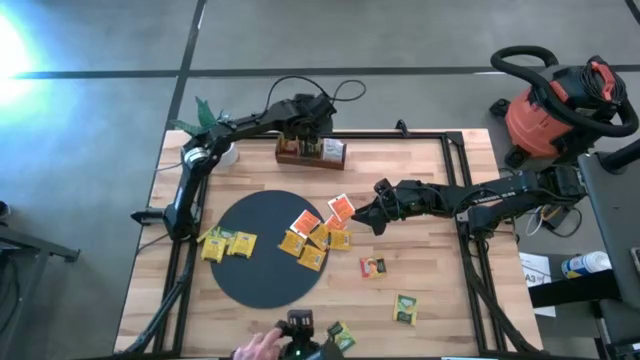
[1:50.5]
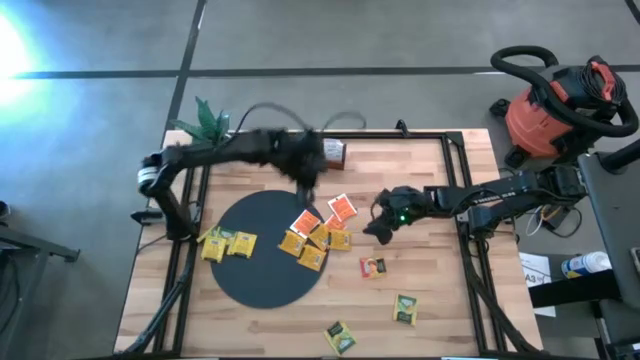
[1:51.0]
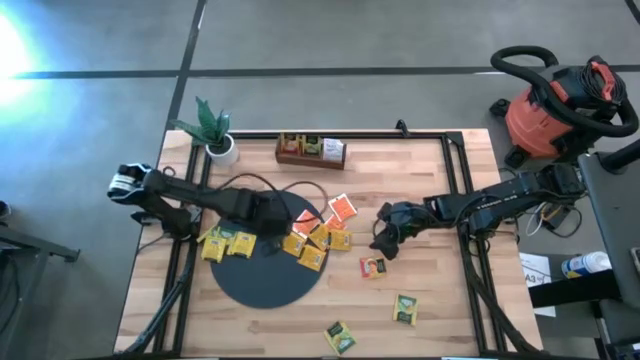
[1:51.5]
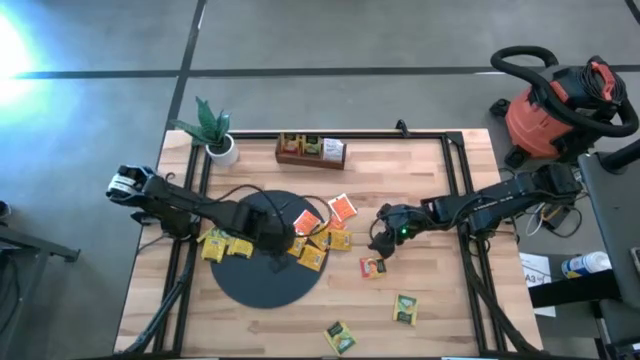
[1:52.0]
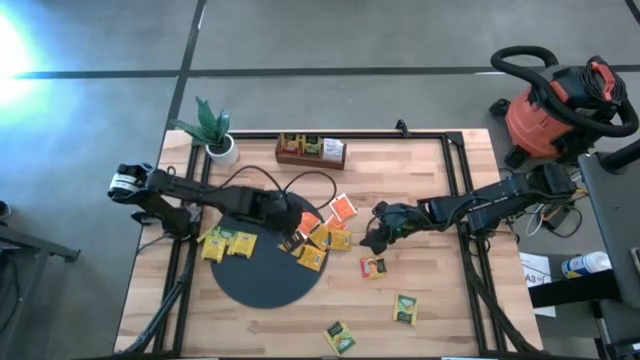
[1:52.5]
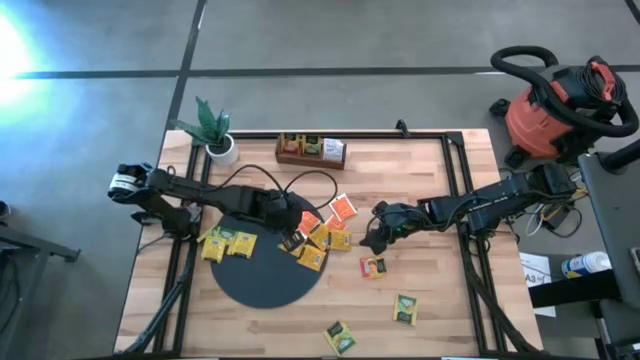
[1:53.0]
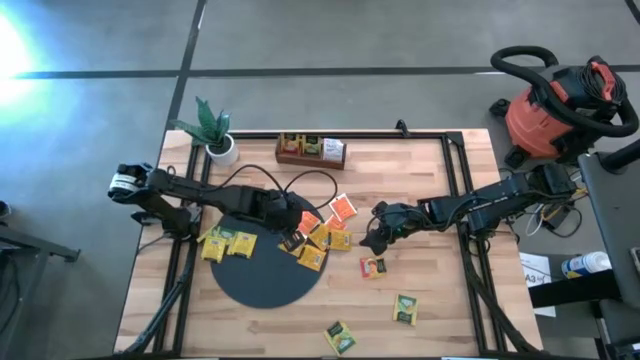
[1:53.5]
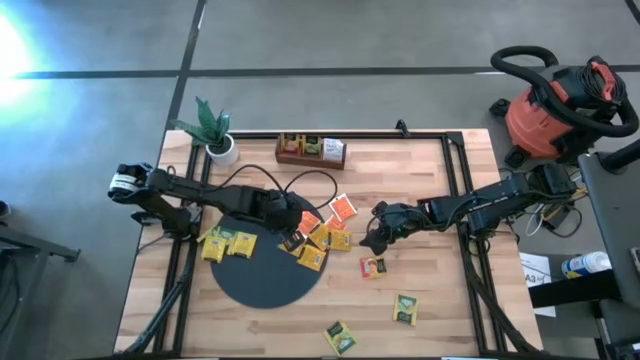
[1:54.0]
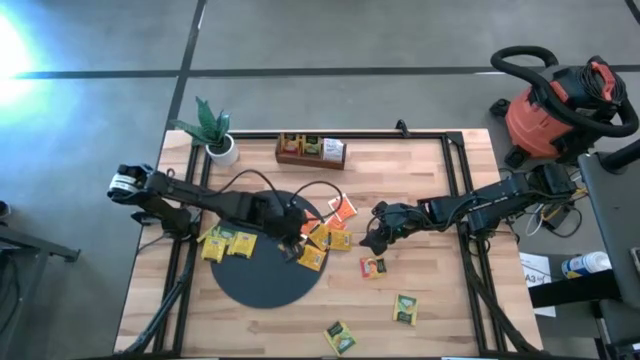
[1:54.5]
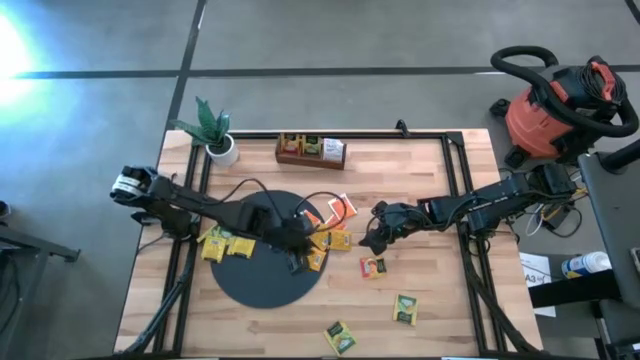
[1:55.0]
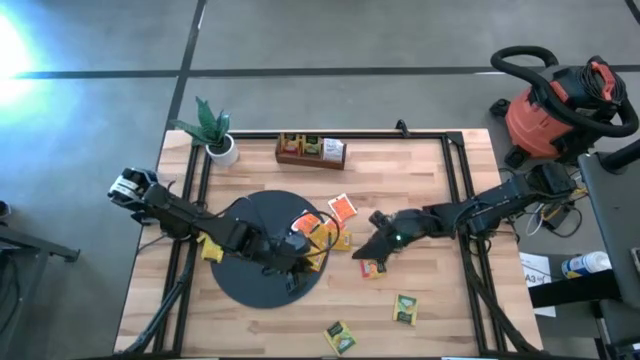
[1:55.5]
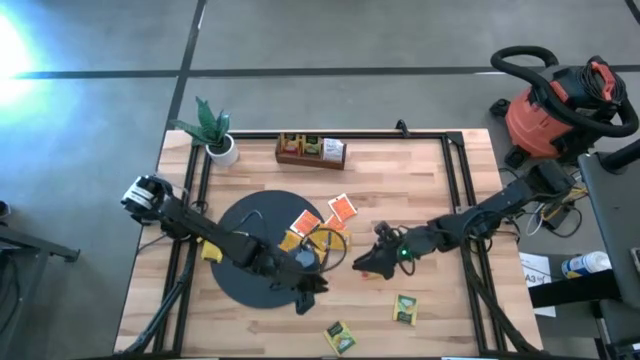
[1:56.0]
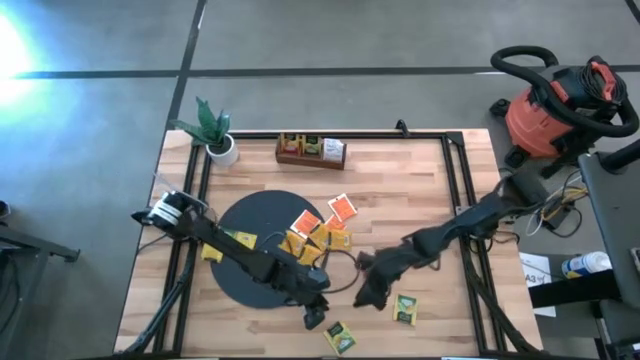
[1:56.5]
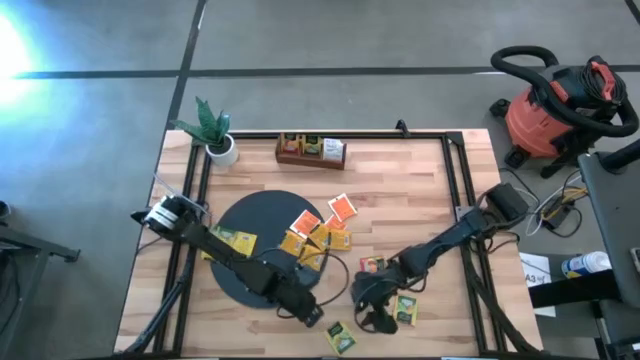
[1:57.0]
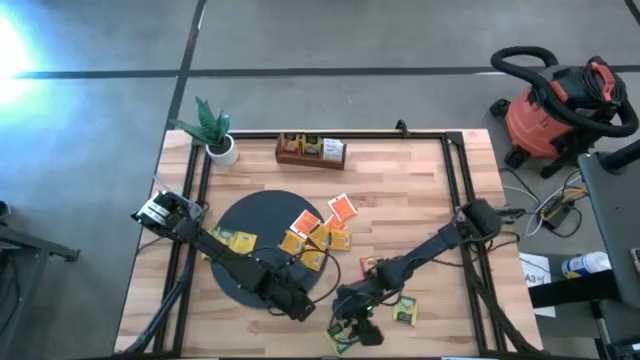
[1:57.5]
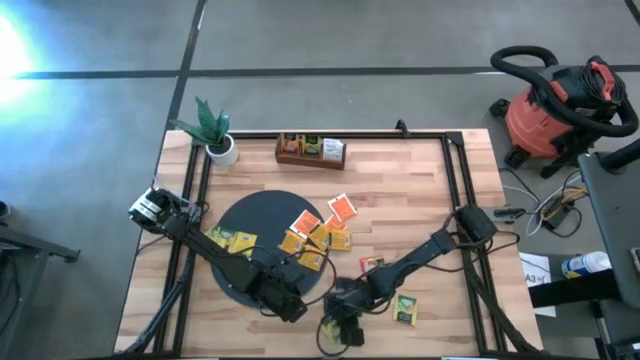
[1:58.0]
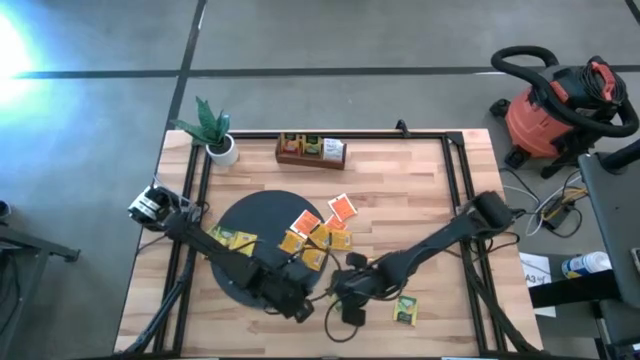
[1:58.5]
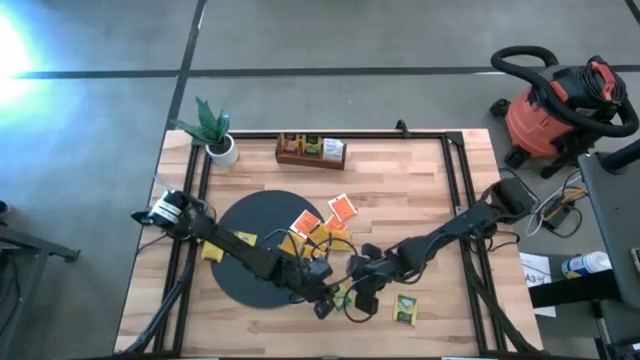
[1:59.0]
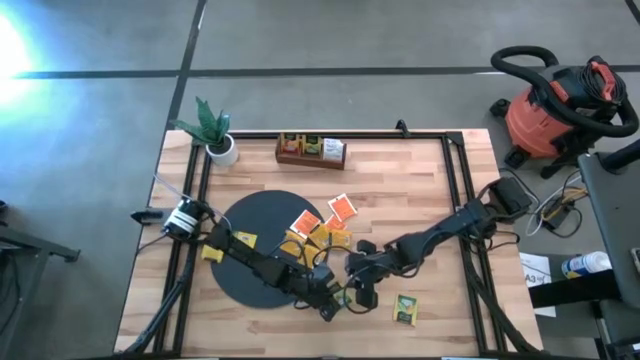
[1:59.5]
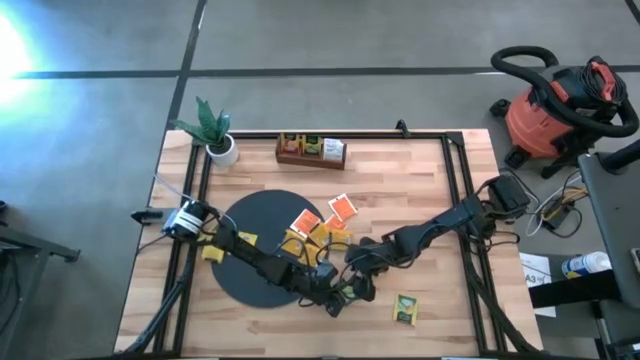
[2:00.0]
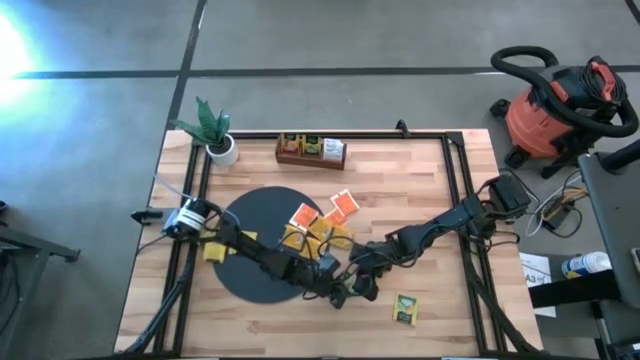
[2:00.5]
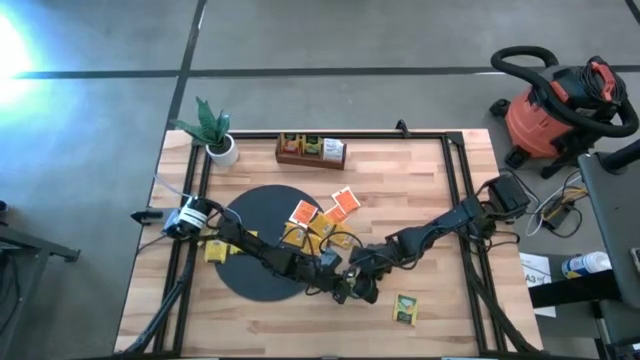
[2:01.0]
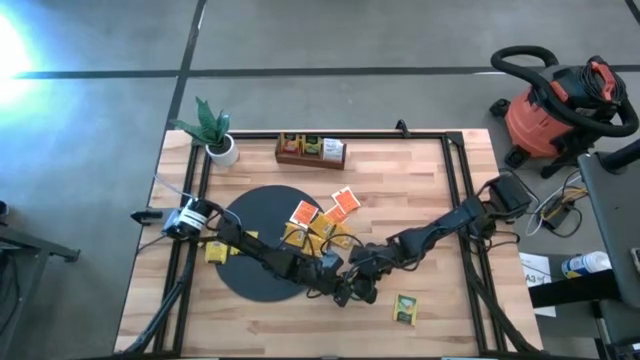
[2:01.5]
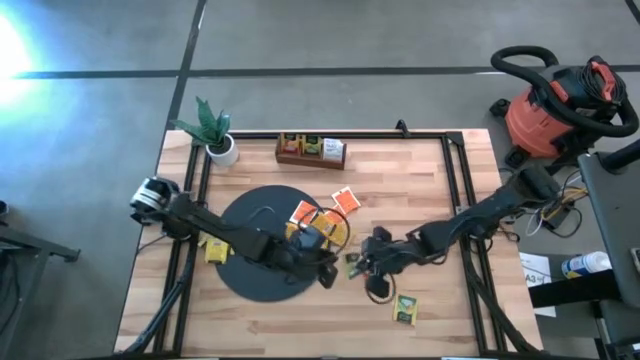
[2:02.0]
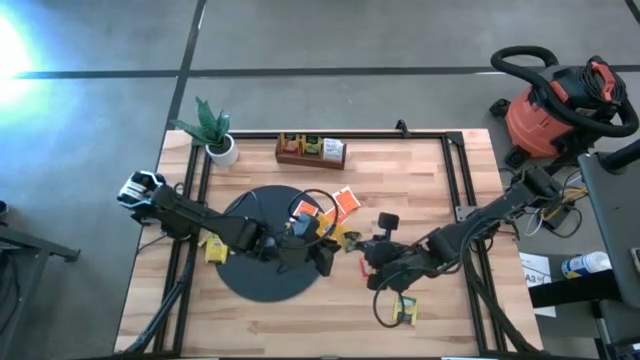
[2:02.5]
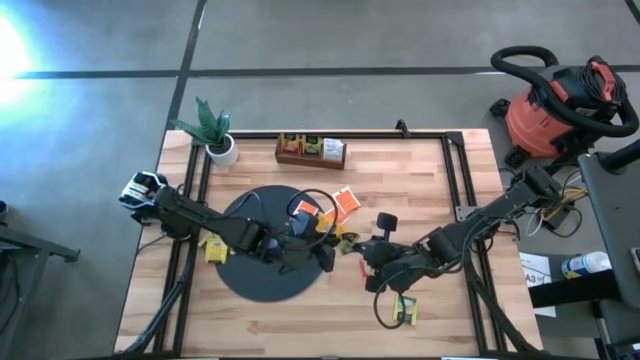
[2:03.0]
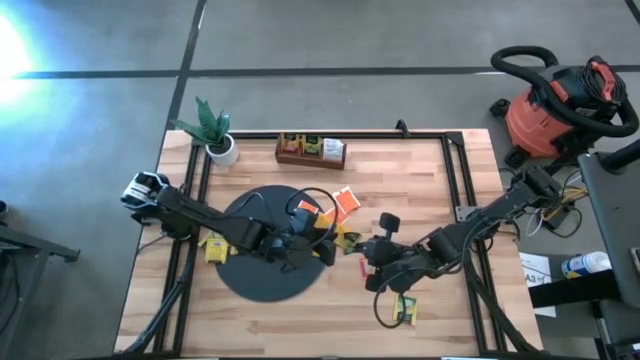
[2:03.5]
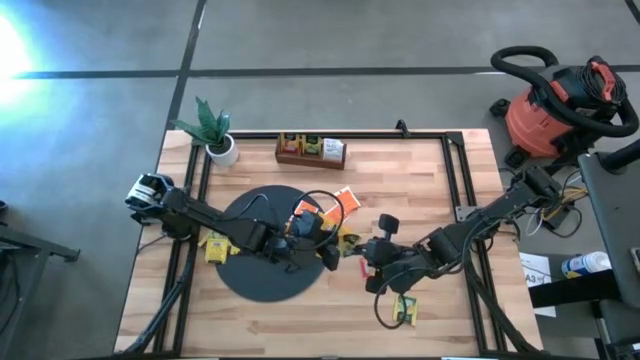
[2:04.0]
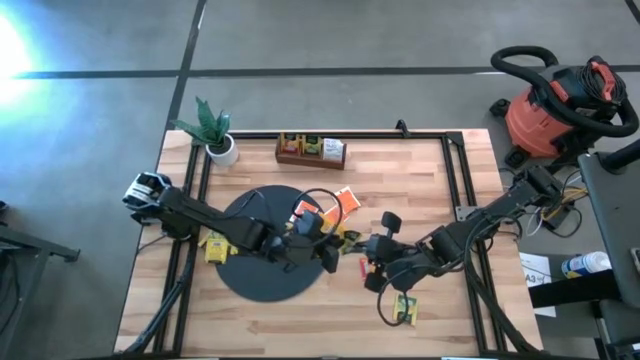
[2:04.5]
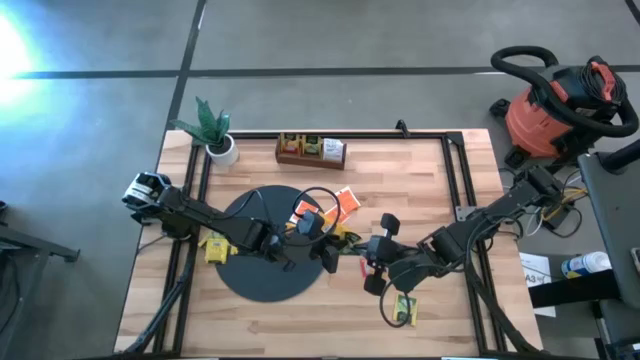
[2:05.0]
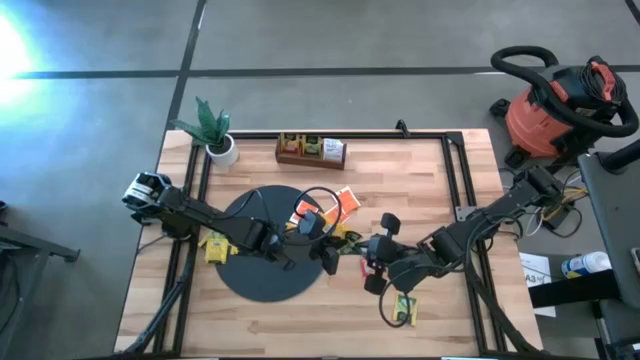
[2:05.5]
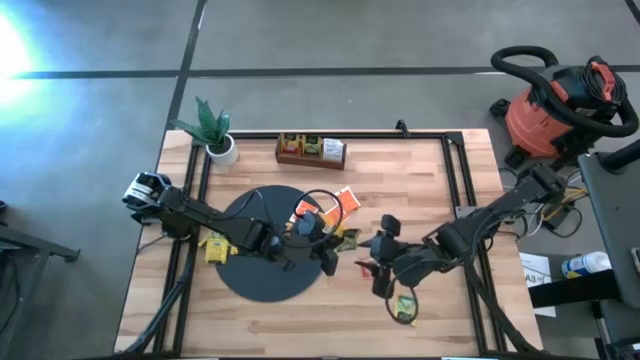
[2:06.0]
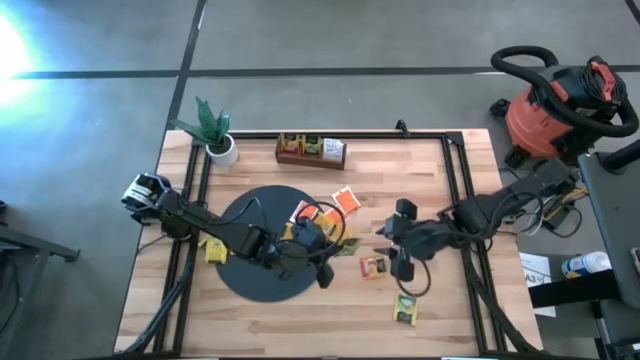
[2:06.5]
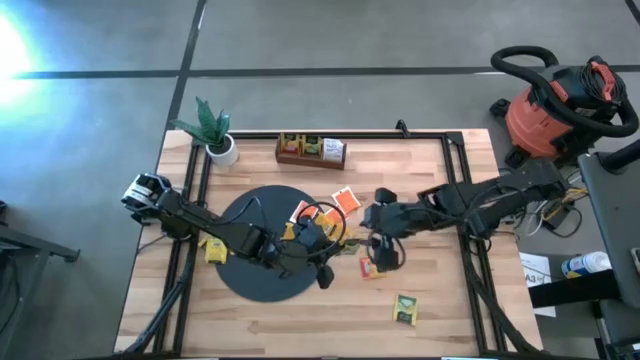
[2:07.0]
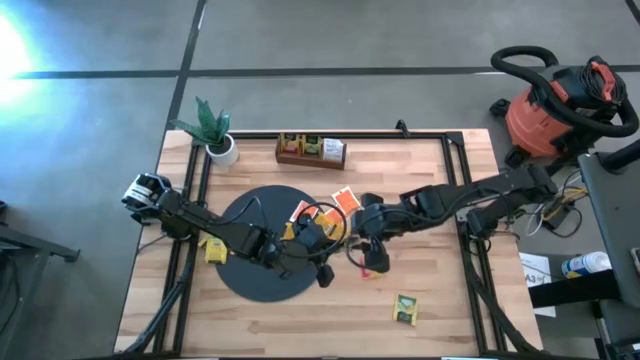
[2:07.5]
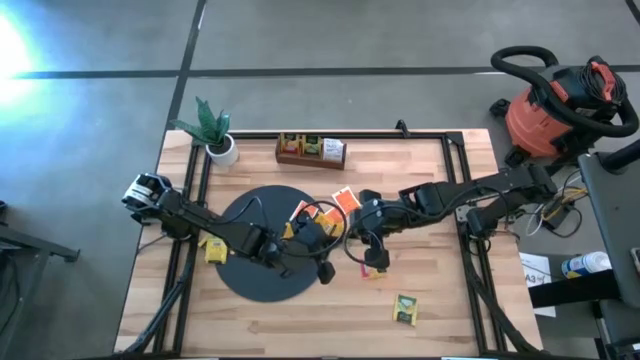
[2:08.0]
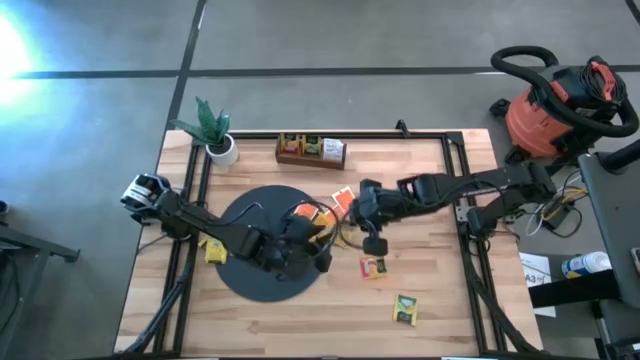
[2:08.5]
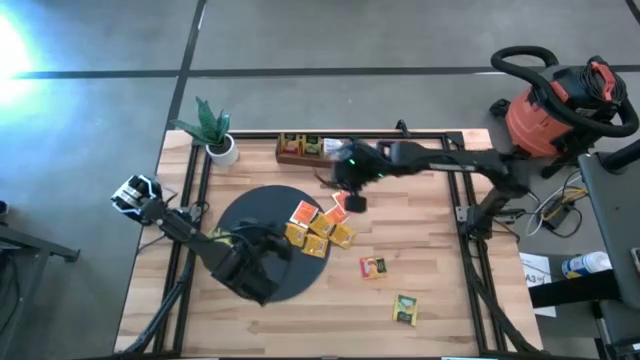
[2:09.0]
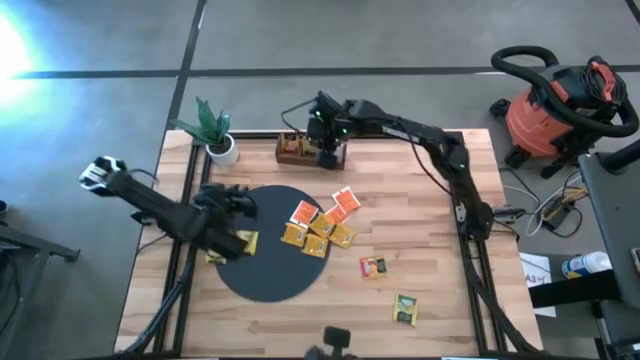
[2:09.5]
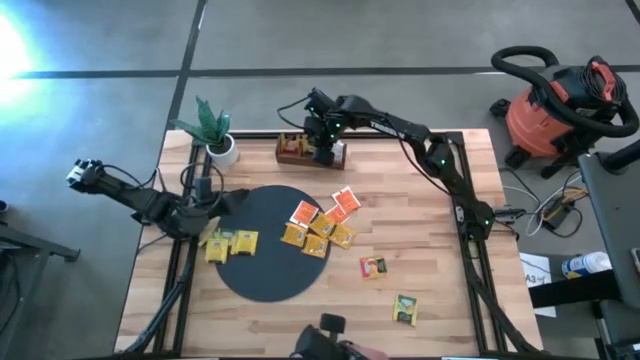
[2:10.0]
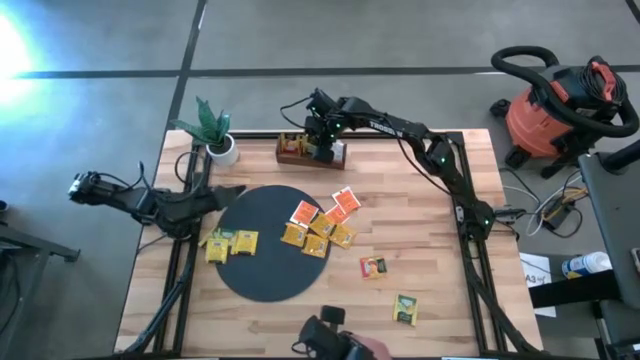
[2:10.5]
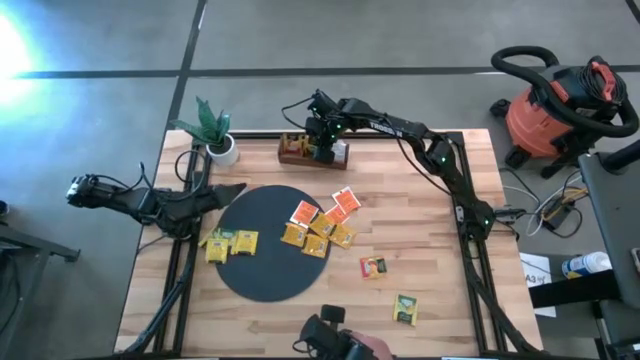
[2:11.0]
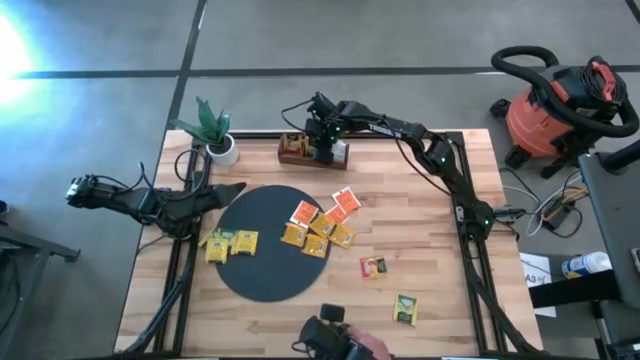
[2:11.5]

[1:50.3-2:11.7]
Task: Pick & Place Tea
Put the yellow tea bag into the middle section of the wooden organizer
